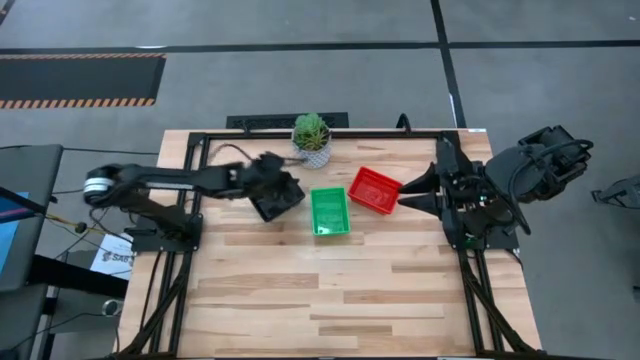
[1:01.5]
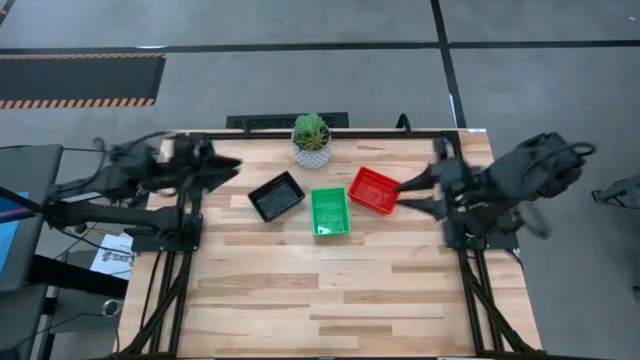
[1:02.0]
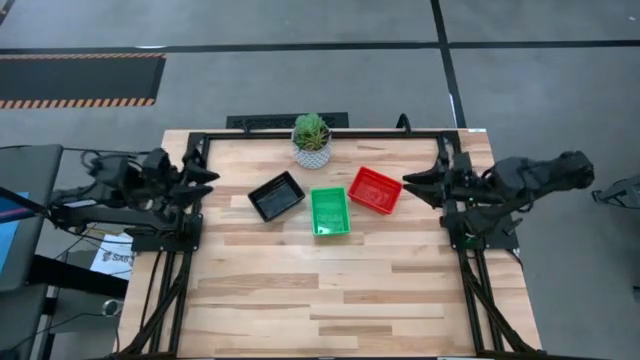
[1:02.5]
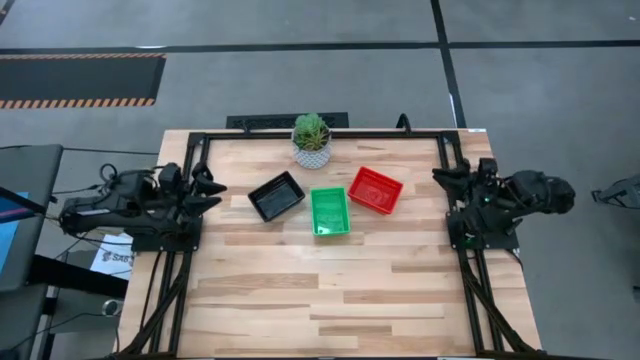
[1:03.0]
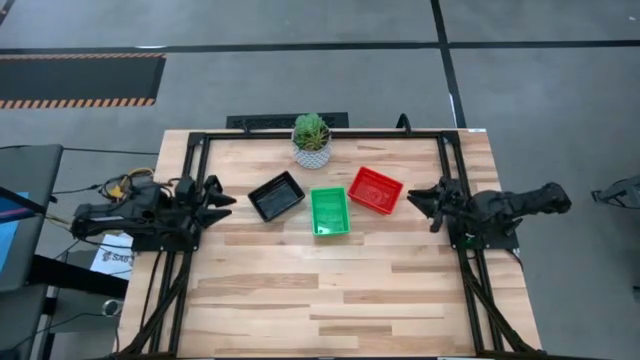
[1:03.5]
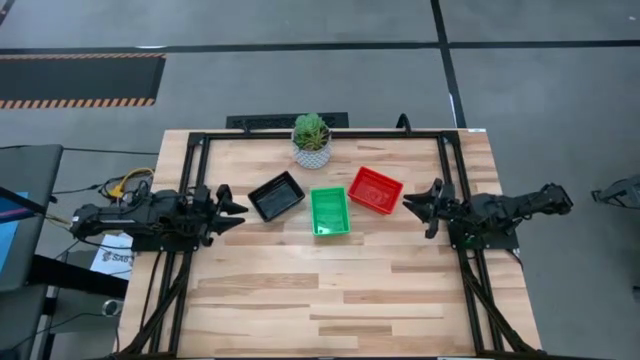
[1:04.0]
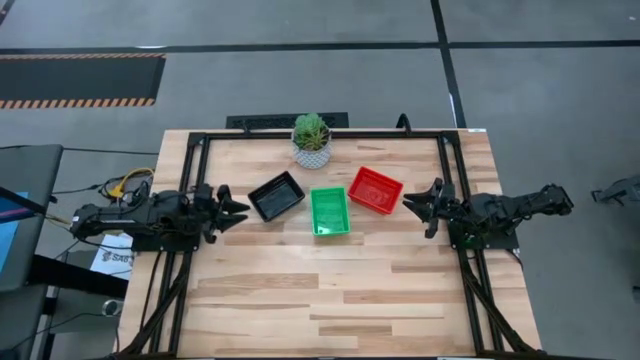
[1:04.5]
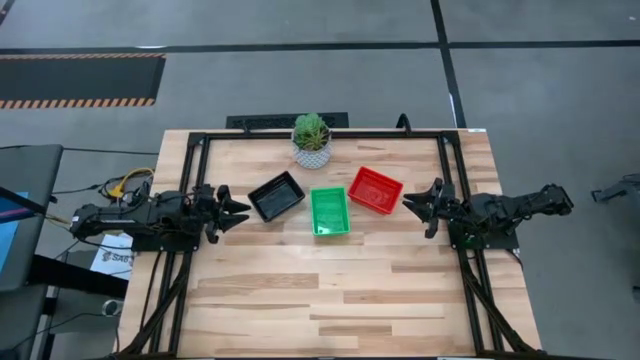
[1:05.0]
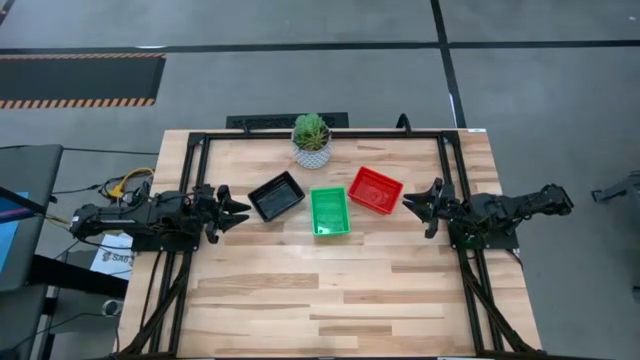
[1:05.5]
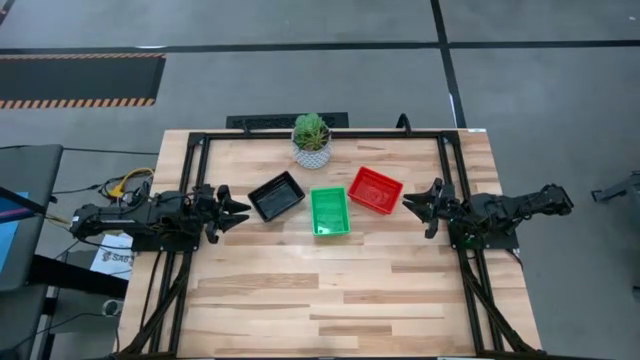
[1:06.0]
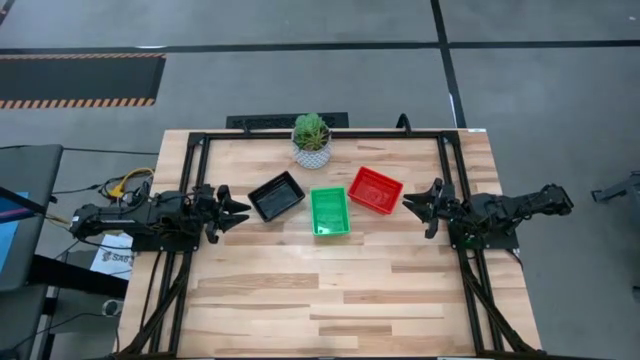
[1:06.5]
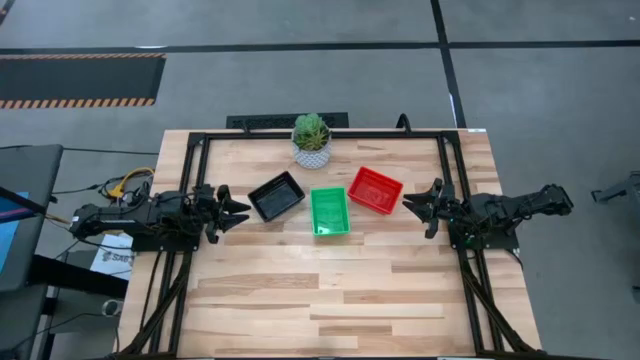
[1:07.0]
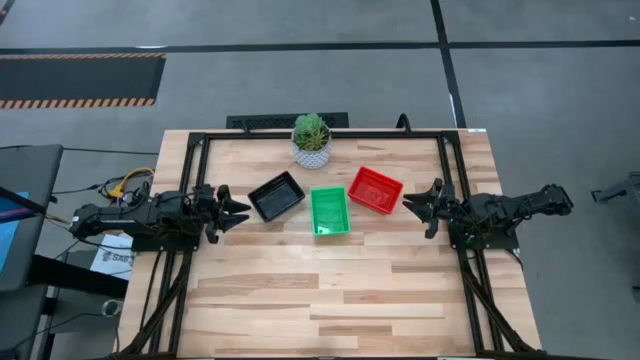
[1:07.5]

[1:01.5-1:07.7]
Return to Home Position
